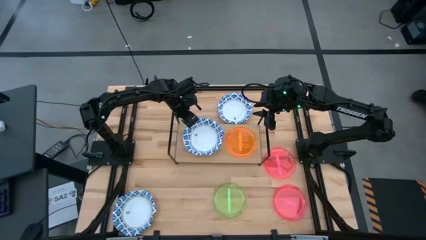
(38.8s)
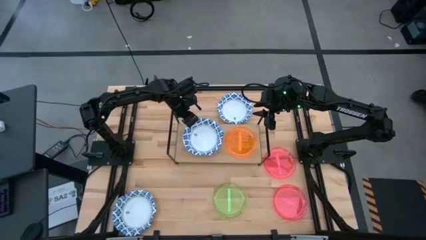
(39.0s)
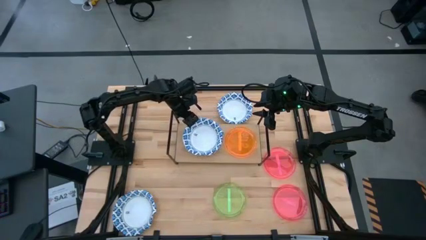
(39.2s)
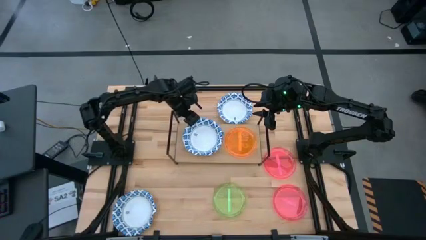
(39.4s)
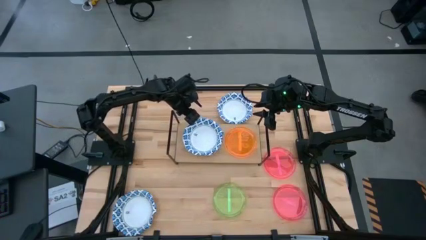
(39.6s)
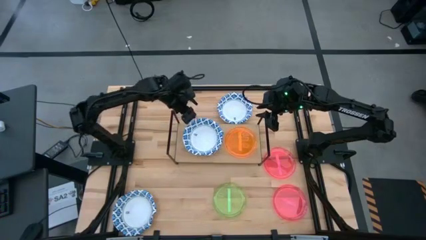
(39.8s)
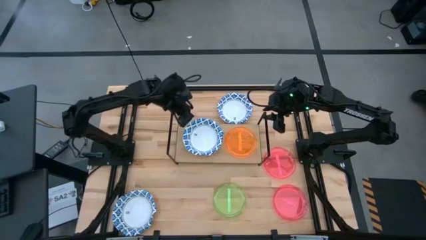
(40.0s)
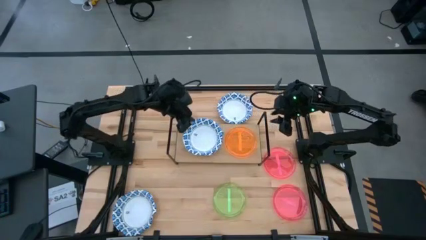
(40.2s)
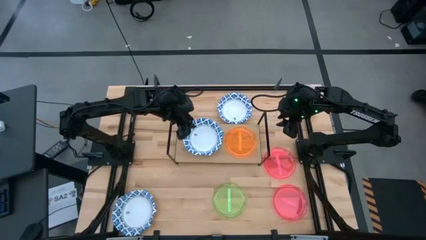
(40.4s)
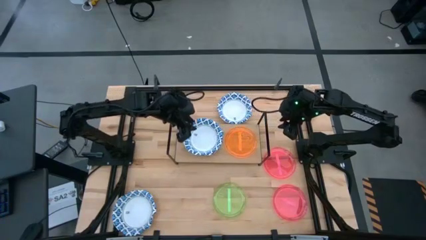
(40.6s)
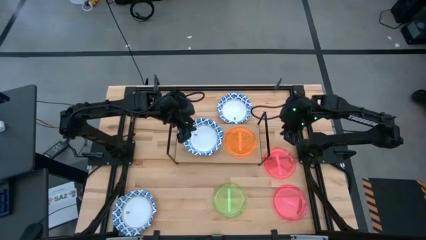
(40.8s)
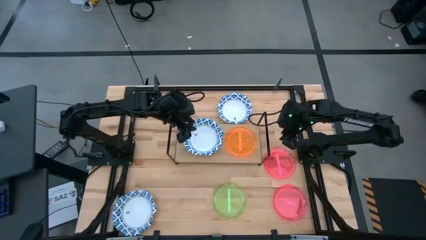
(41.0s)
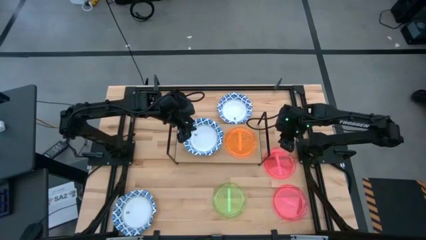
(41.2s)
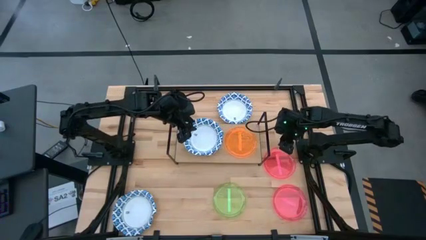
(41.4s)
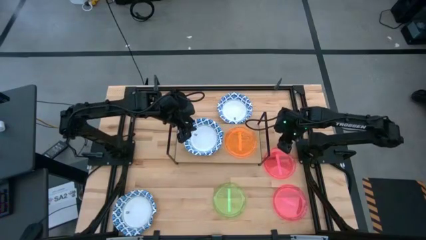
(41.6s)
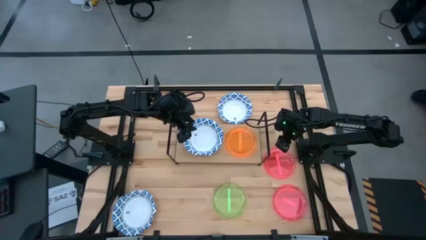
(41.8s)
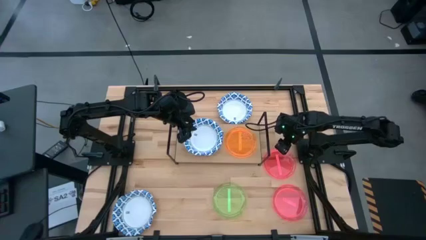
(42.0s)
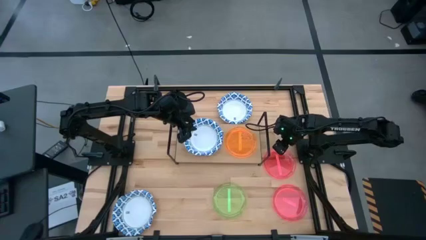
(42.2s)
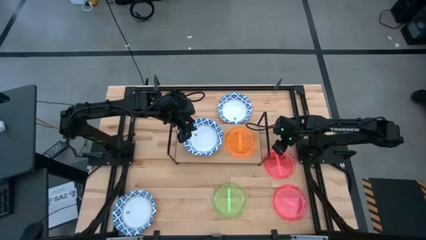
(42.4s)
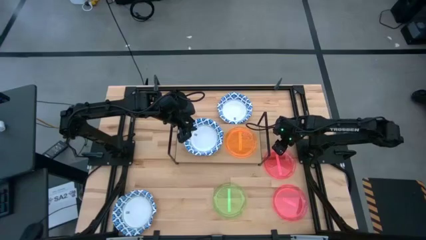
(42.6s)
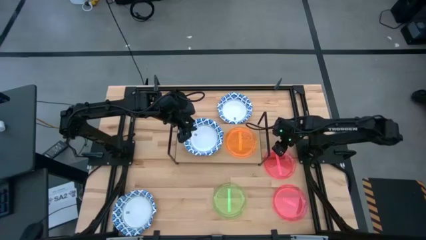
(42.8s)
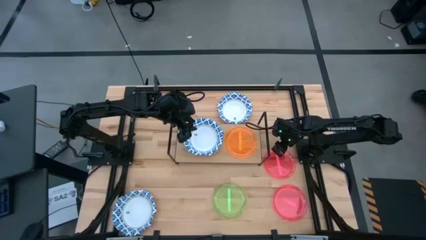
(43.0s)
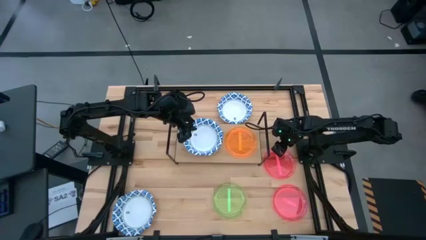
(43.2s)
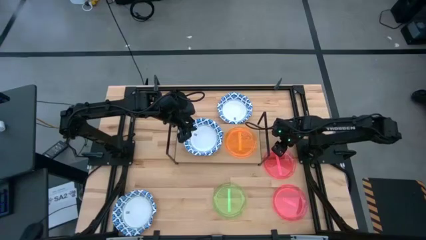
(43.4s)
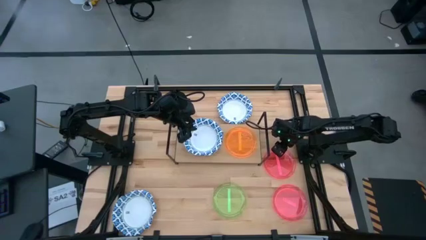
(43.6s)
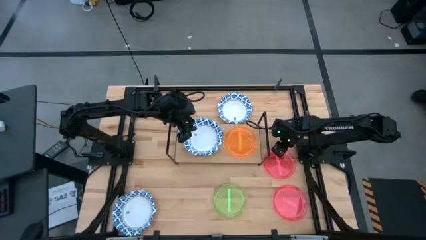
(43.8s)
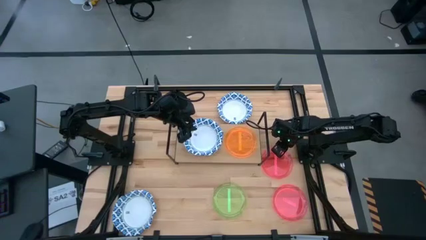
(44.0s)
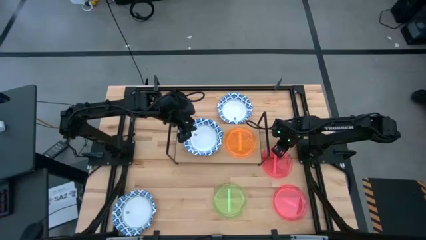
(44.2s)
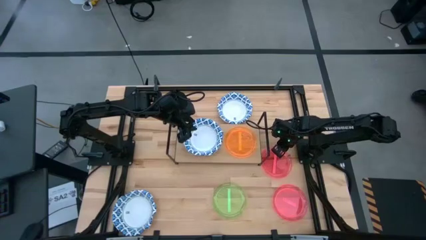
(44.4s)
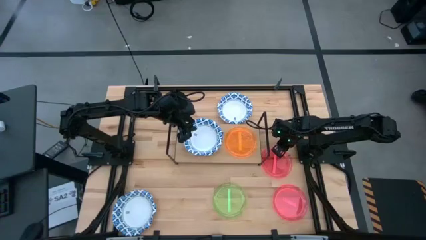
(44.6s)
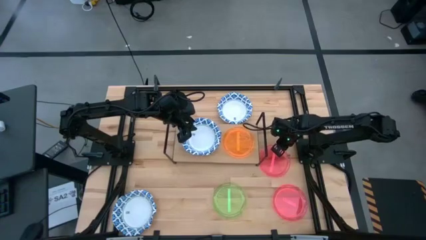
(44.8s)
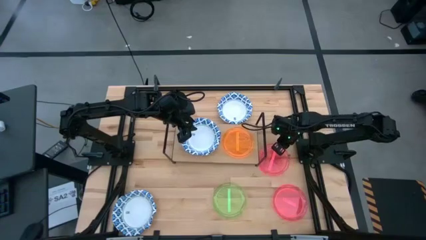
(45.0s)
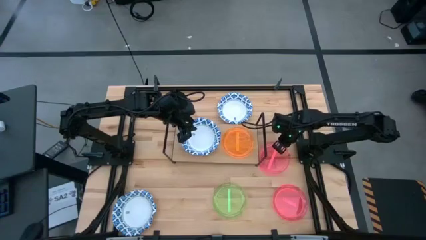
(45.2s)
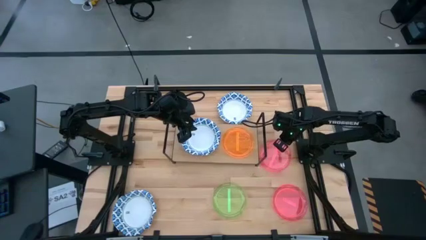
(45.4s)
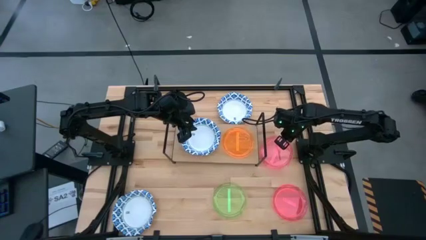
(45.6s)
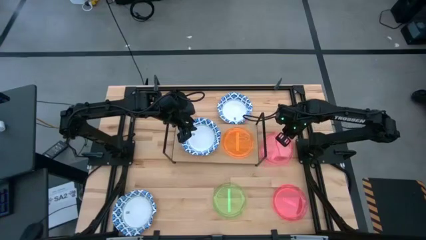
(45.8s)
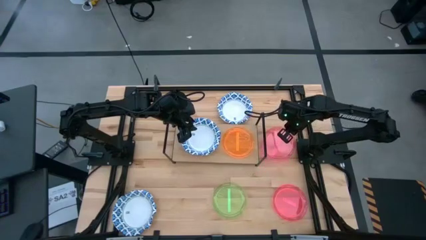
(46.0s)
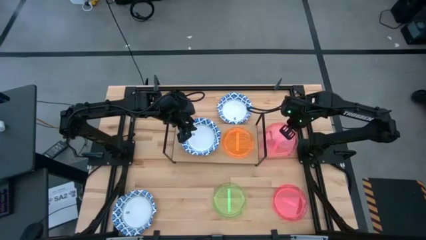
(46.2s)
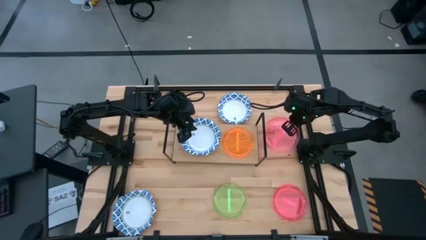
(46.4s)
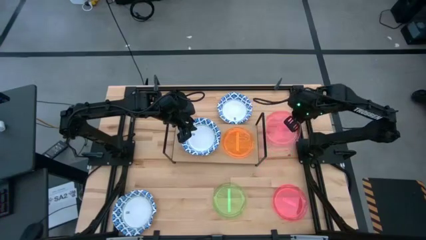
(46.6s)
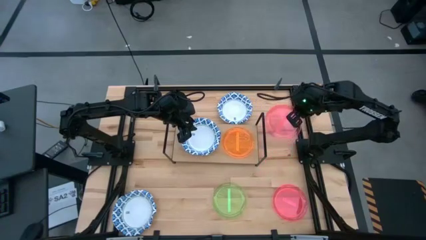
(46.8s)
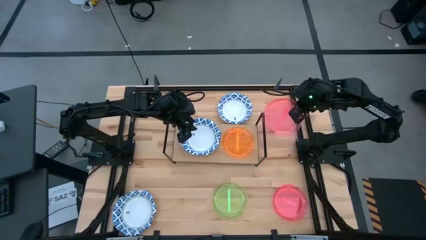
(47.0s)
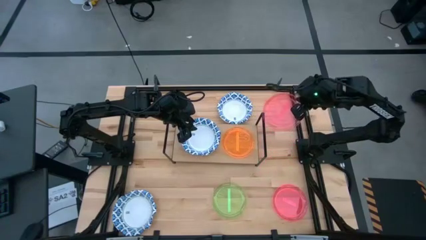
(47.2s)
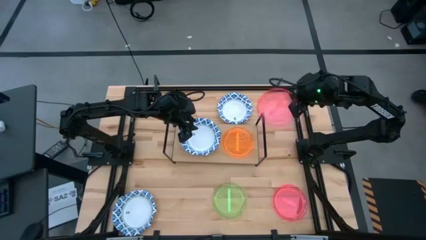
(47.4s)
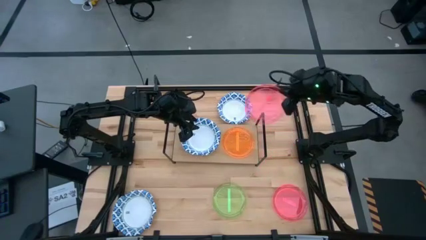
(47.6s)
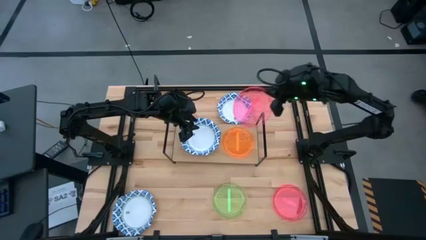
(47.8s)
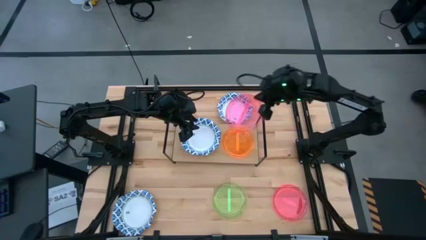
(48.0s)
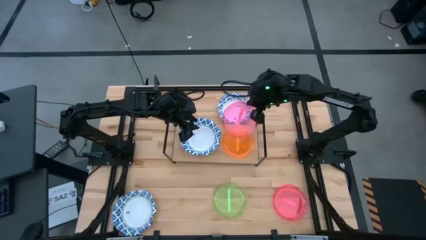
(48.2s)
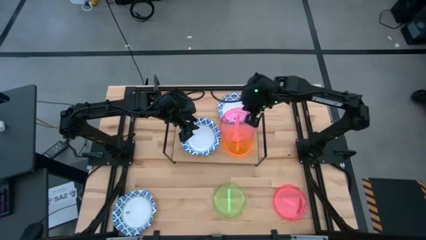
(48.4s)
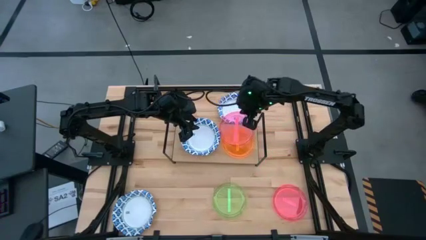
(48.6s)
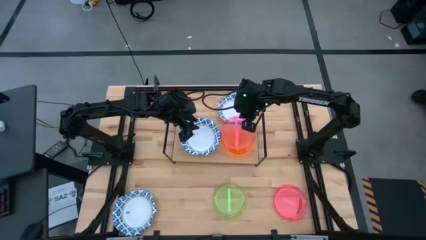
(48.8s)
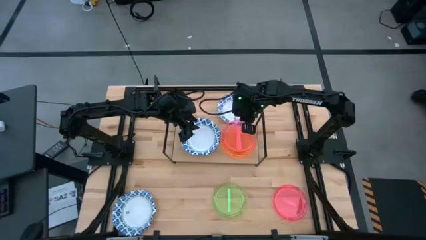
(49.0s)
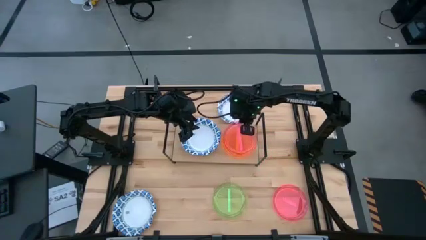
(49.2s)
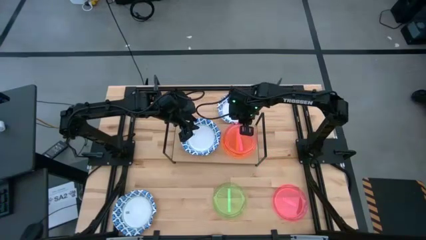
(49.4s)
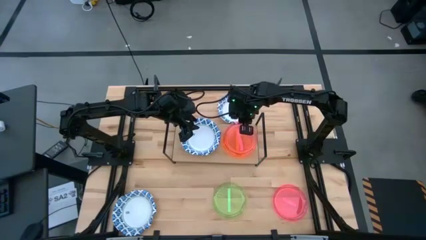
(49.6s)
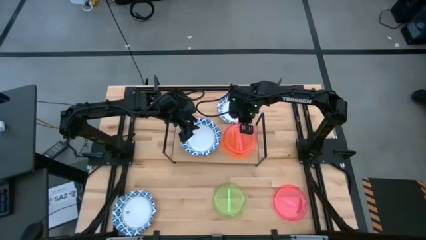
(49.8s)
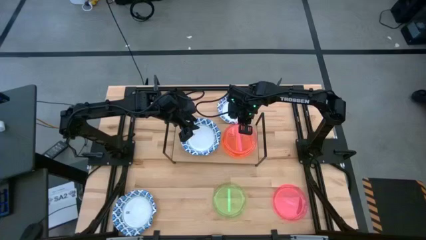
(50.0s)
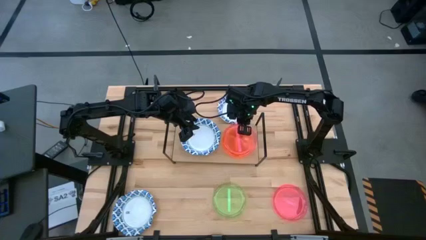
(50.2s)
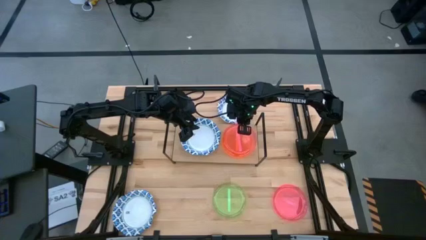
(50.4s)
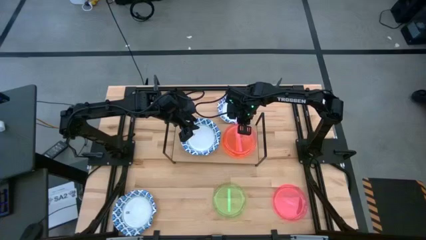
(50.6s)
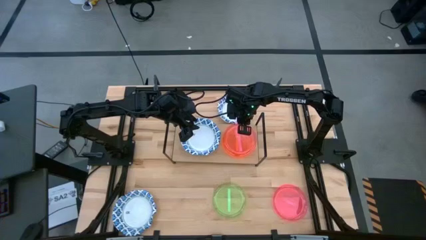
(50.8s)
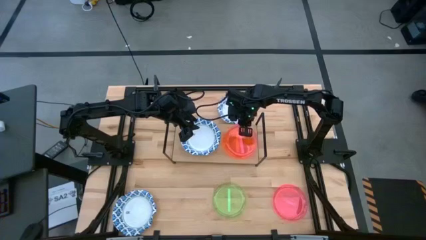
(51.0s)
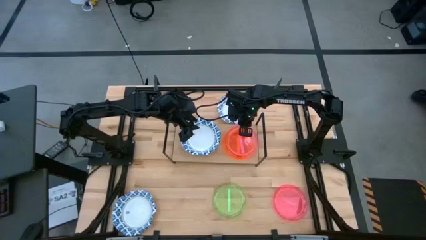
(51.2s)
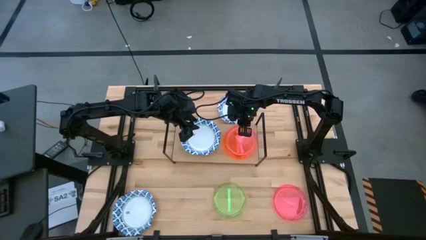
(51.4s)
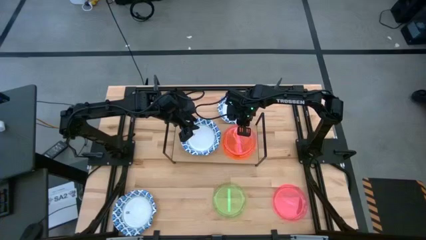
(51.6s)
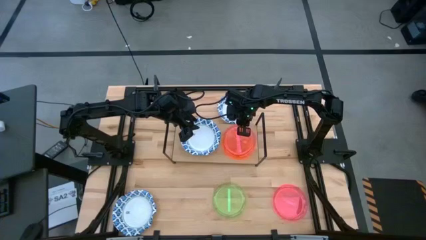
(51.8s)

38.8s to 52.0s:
Task: Place and stack plates onto a shelf
Stack the pink plate on top of the orange plate on the shelf

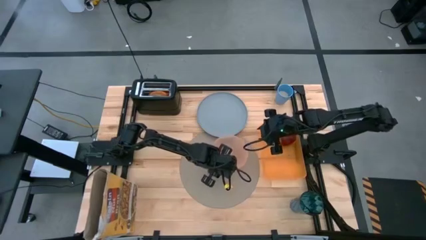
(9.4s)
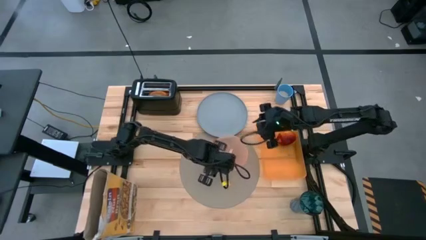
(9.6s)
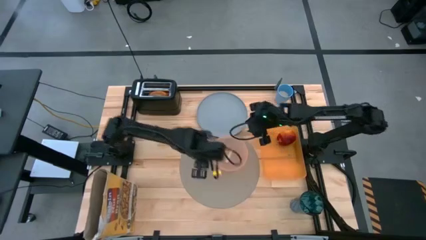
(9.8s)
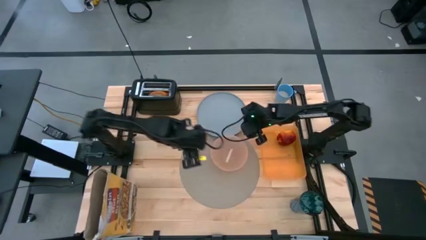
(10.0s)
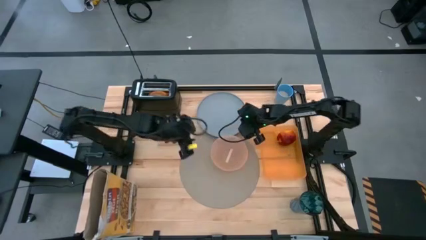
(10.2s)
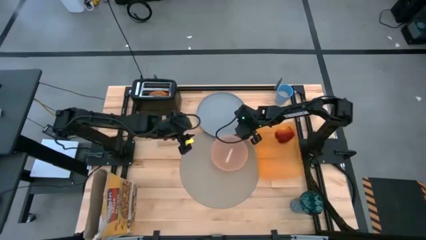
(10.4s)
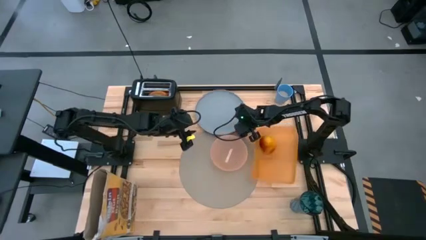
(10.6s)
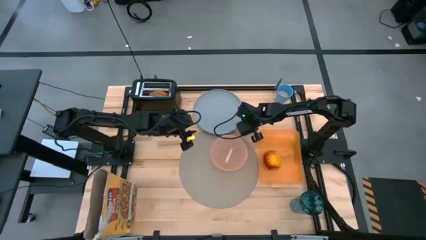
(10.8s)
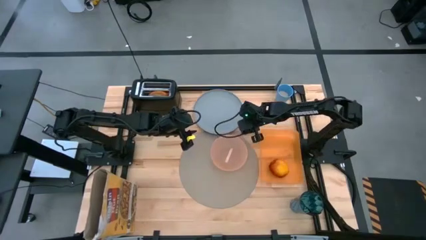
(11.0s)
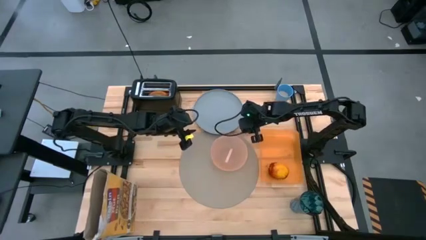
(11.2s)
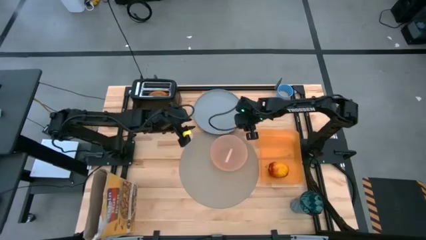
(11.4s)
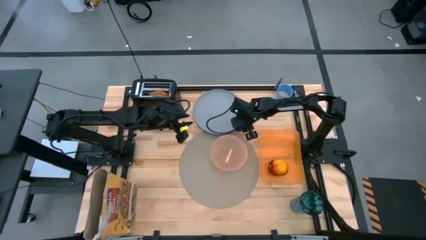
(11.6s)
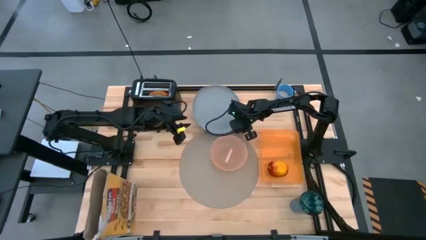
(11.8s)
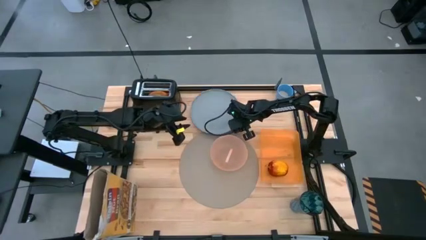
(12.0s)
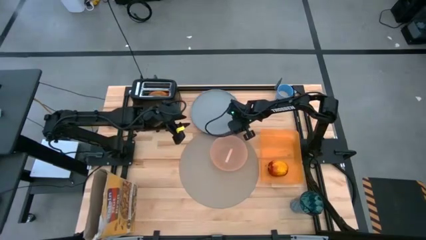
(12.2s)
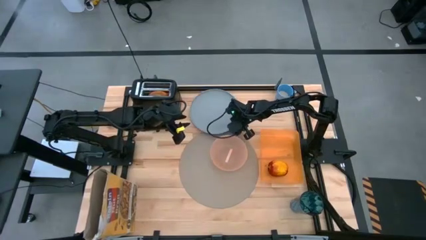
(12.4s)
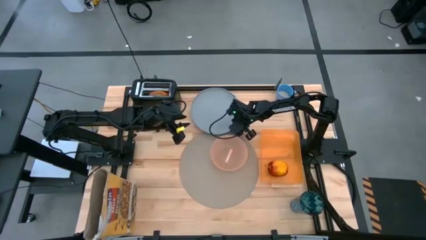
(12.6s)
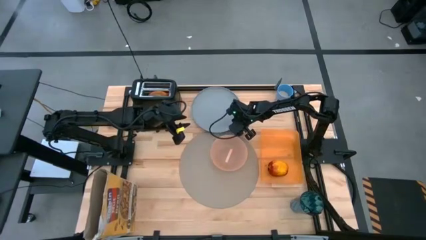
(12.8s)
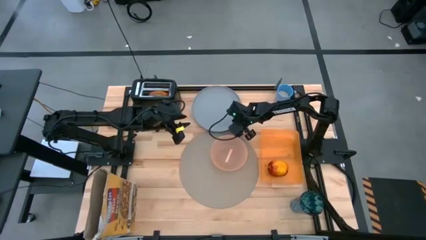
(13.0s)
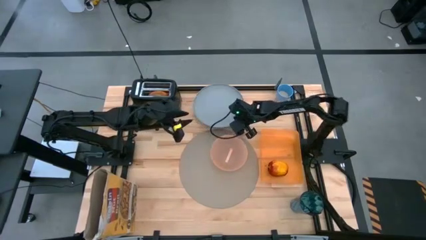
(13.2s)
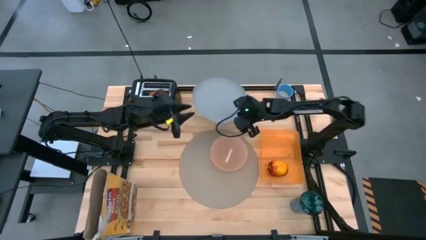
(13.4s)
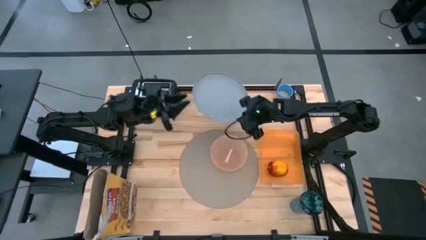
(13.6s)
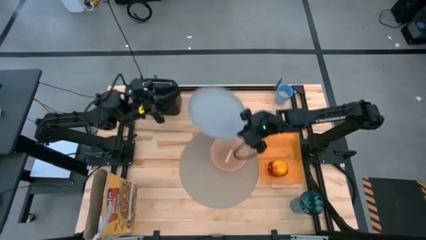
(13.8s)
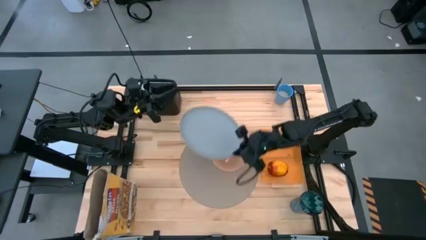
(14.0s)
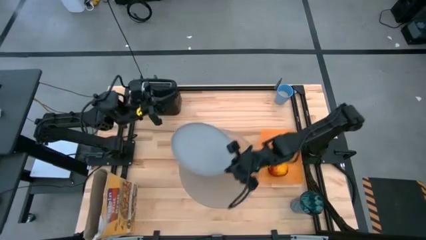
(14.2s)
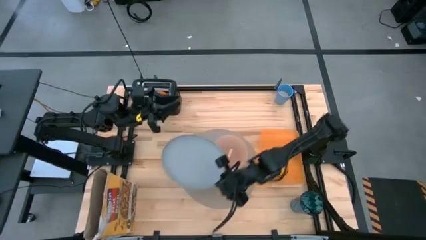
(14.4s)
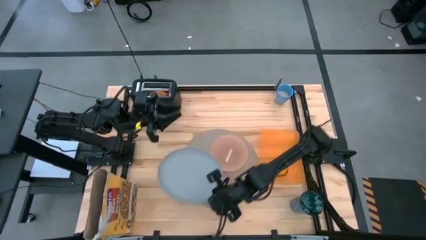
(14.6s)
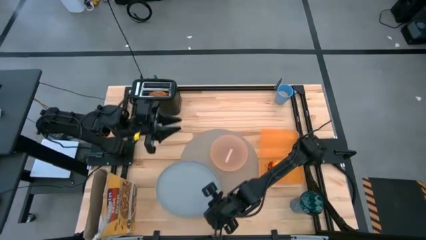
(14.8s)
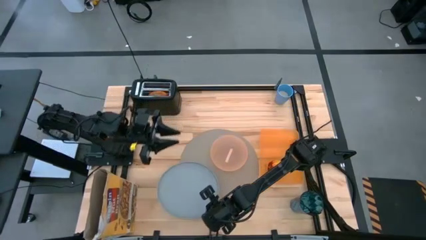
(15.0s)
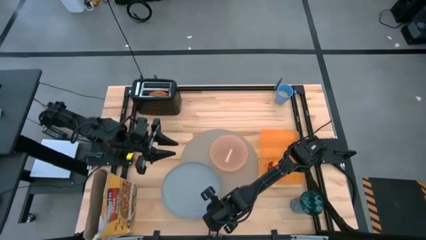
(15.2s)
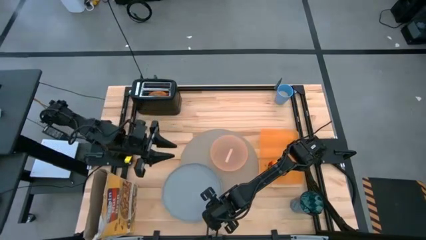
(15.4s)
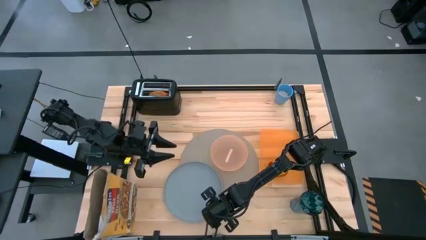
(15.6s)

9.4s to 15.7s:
Task: Arrange a breakfast setting
Put the blue plate at the bottom of the light orange bowl on the gray mat
